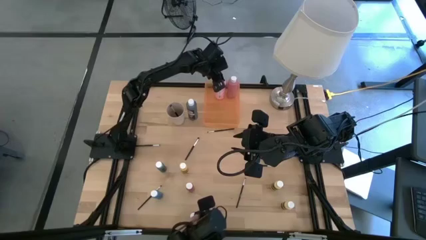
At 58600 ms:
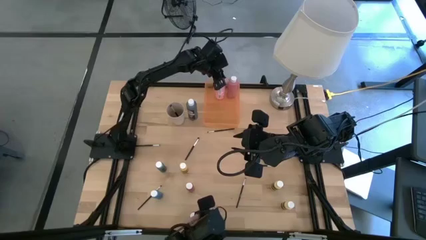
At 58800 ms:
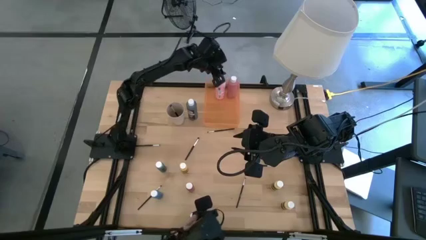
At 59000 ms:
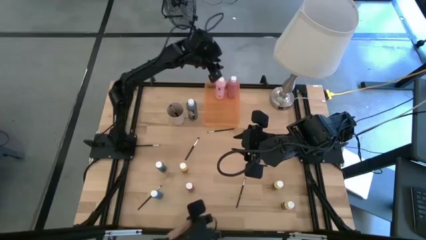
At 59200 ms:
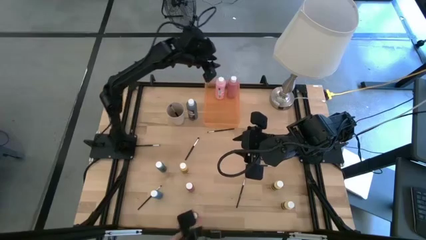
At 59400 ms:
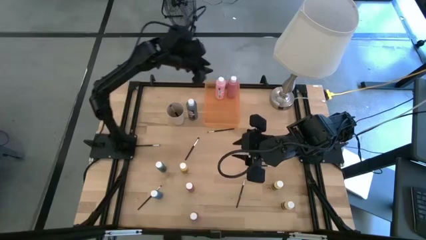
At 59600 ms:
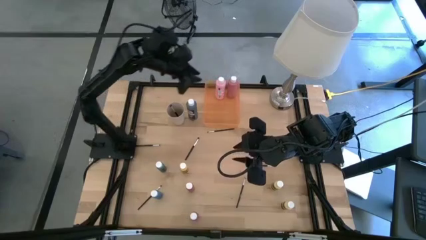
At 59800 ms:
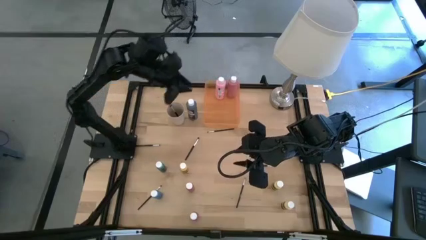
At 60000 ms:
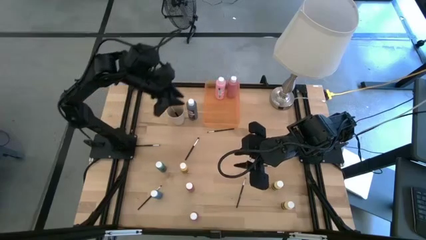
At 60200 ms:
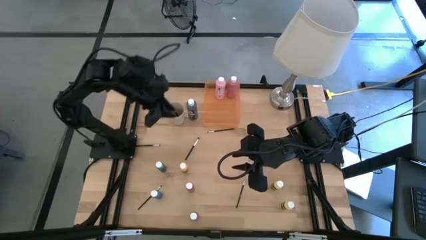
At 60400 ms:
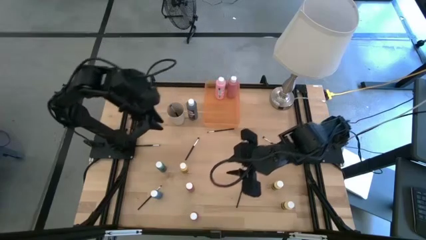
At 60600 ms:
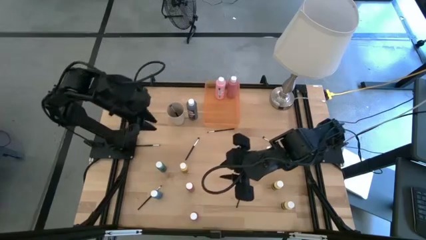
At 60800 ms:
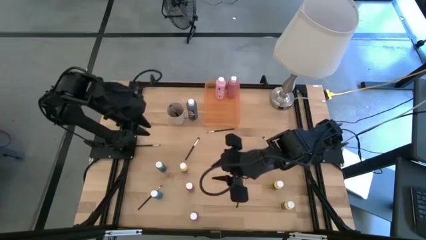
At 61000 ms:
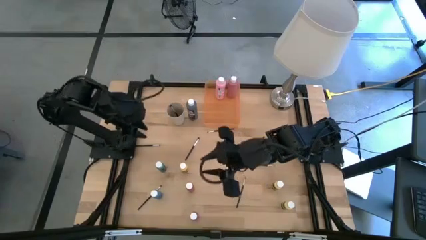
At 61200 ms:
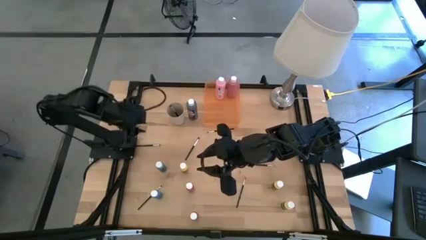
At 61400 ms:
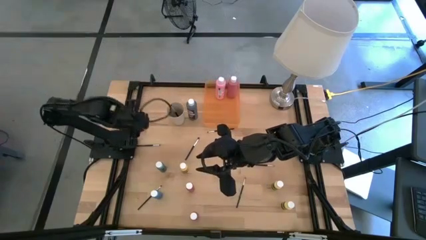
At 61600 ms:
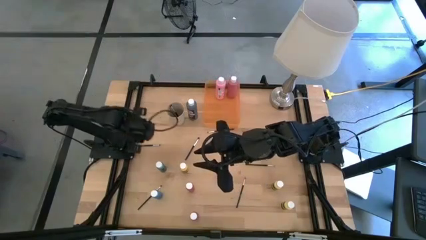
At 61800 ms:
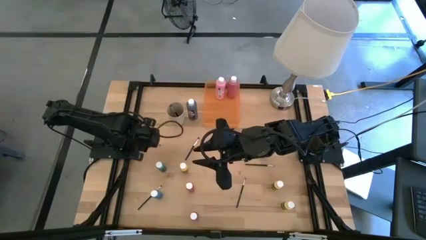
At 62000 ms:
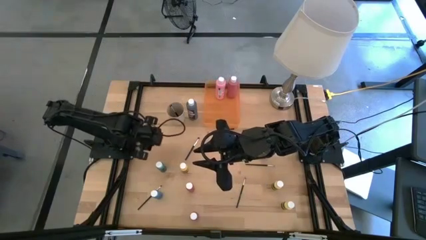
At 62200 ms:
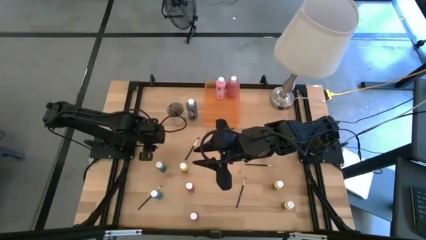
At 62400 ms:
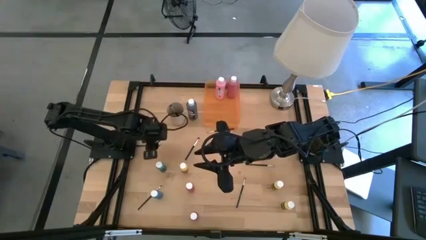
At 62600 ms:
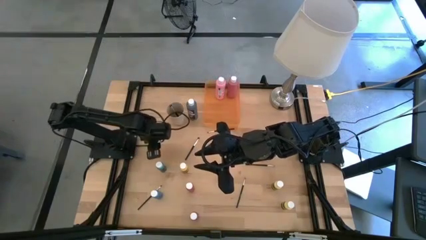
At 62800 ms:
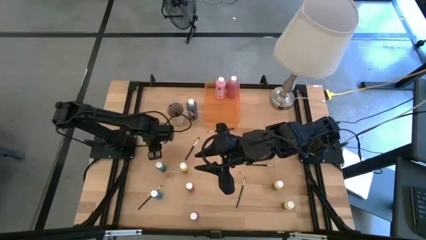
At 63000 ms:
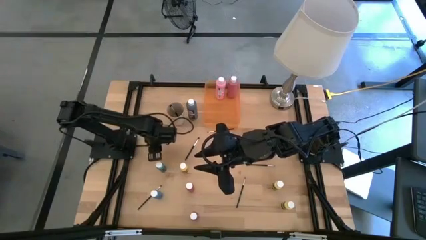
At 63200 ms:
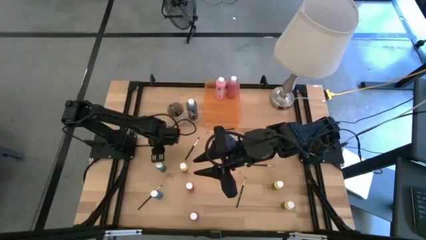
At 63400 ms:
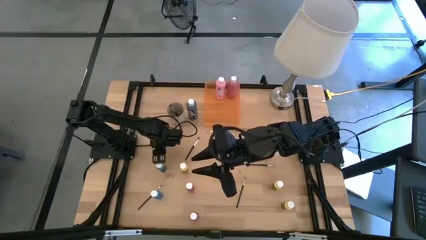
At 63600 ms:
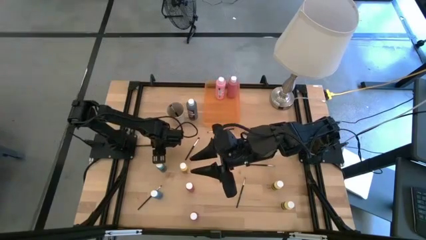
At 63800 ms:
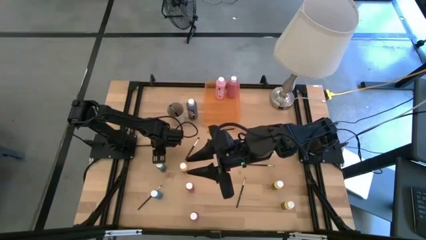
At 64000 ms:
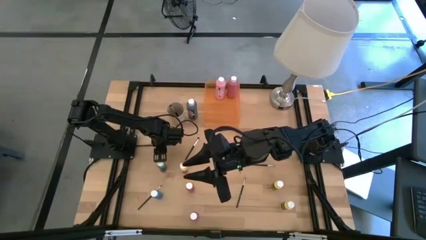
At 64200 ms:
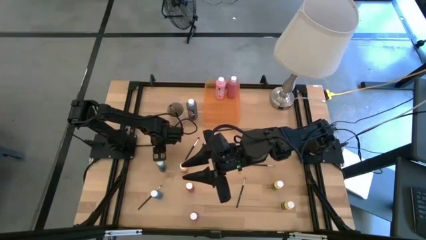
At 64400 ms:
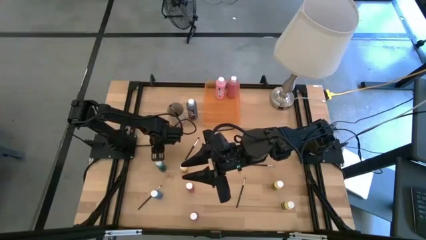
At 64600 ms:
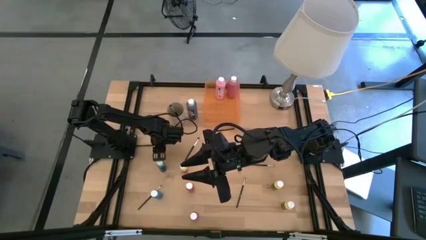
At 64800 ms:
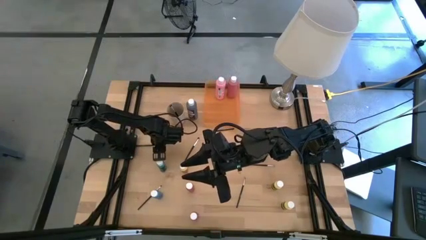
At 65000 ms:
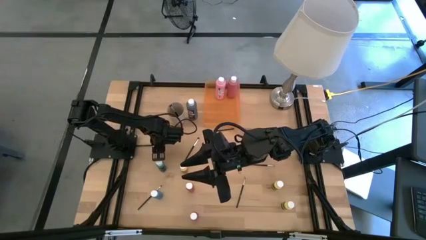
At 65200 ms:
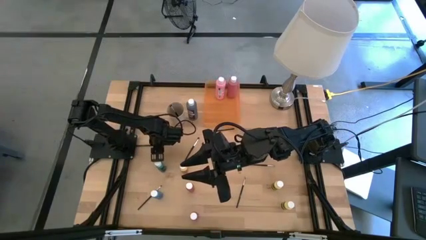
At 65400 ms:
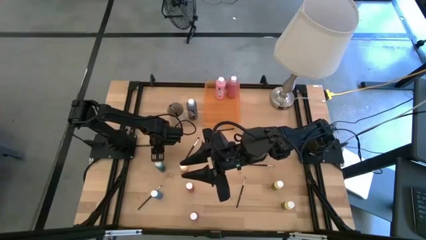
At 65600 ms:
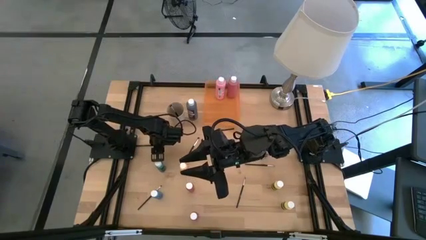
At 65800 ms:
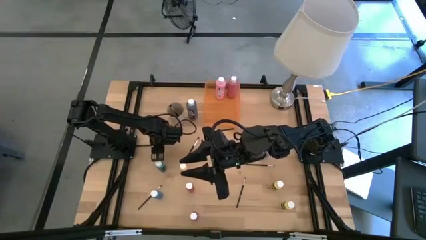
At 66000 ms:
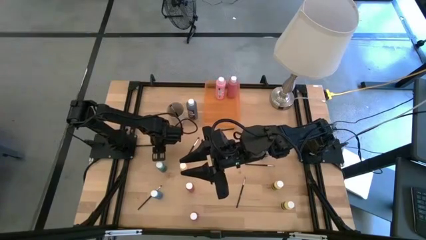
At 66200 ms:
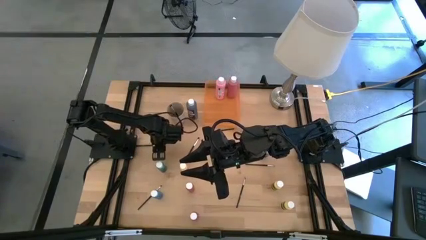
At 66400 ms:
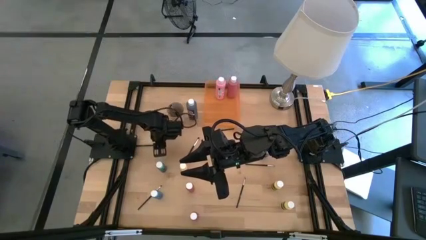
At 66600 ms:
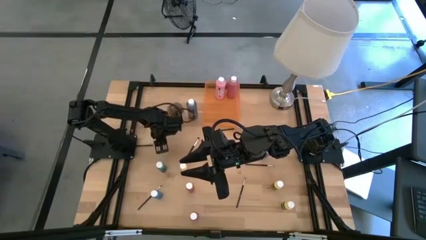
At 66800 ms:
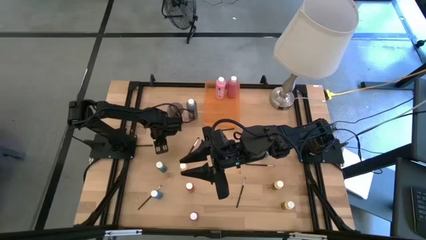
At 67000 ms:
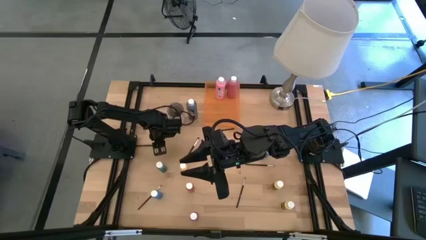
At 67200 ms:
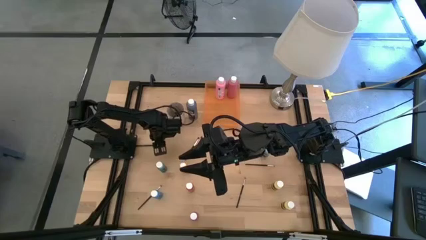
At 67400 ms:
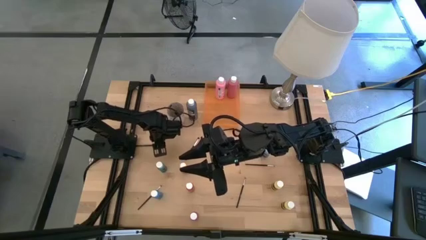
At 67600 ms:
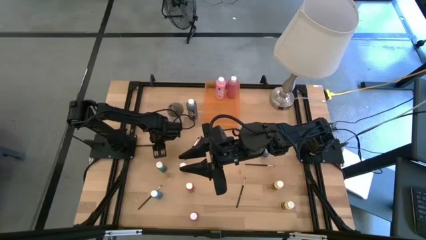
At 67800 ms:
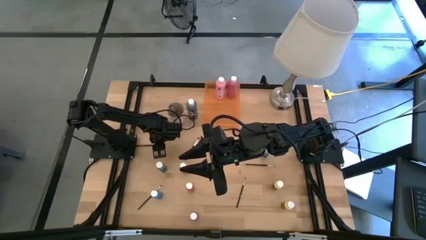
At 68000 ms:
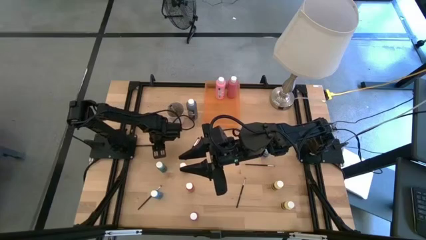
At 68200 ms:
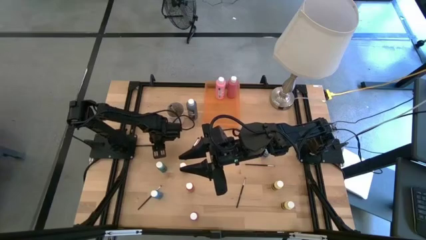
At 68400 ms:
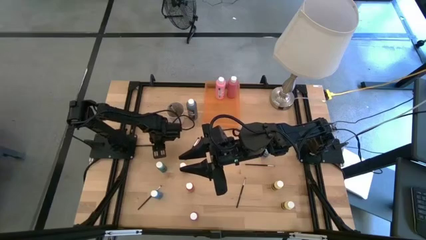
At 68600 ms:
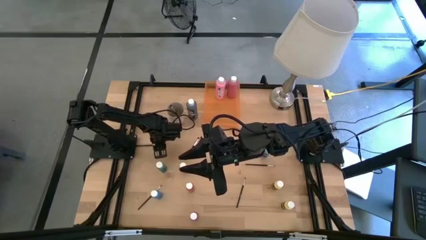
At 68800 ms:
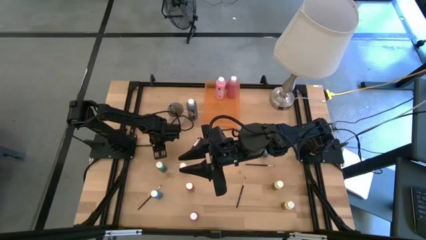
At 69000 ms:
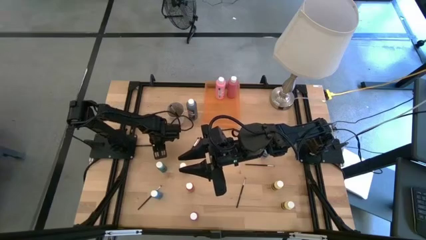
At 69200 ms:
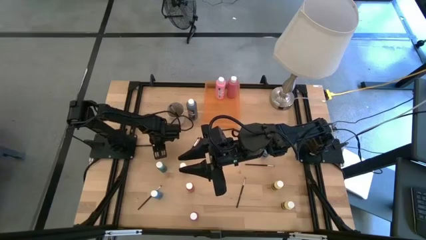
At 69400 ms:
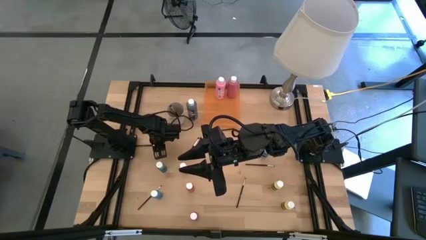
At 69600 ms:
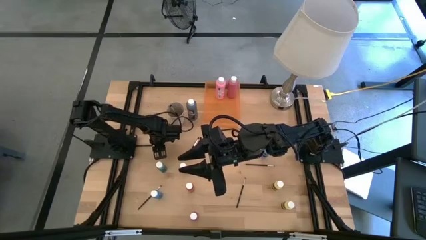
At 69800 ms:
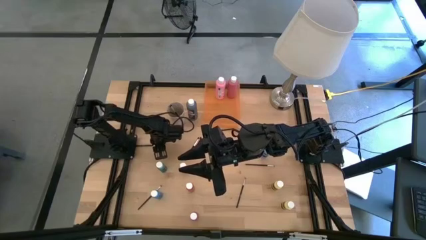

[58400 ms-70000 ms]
Task: Pick & Place Paint Supplies
Put the black paint brush into the white cup

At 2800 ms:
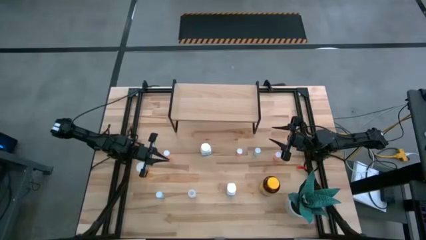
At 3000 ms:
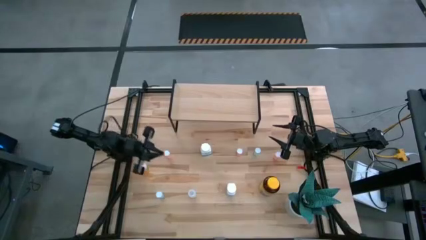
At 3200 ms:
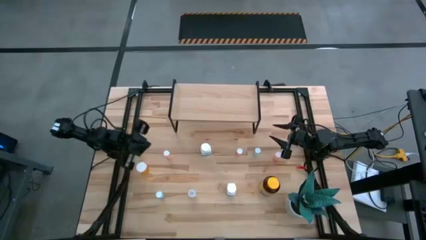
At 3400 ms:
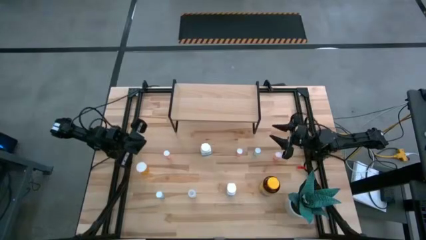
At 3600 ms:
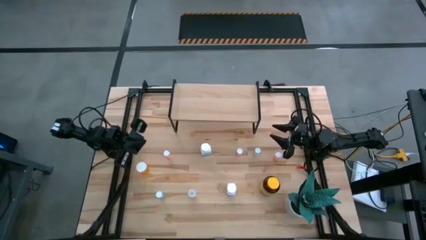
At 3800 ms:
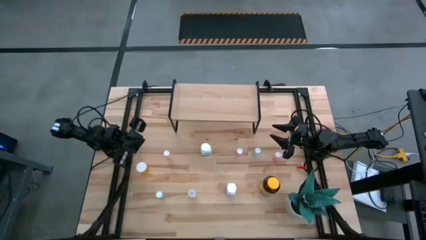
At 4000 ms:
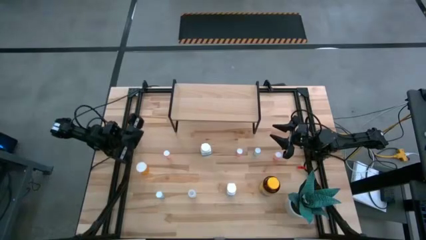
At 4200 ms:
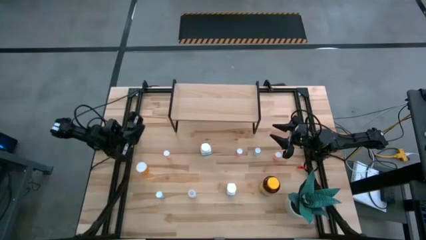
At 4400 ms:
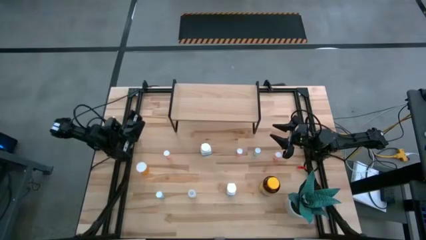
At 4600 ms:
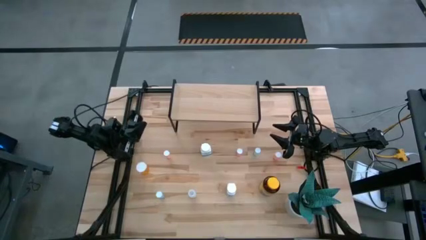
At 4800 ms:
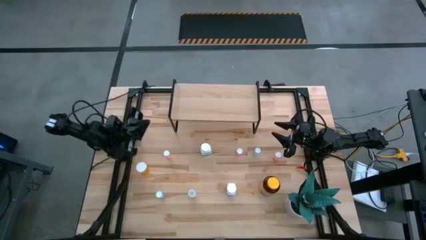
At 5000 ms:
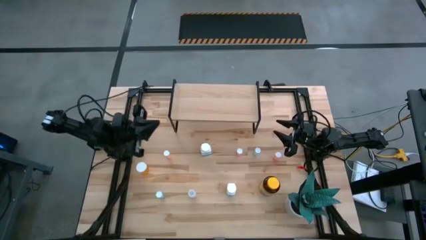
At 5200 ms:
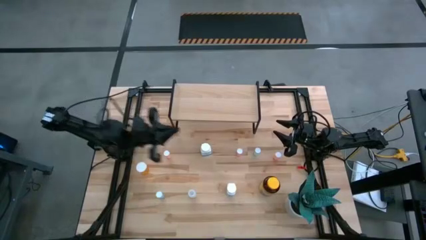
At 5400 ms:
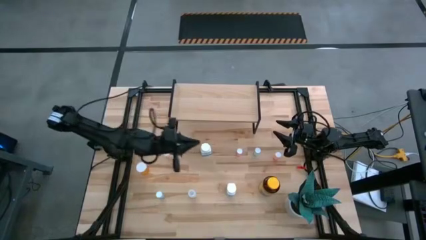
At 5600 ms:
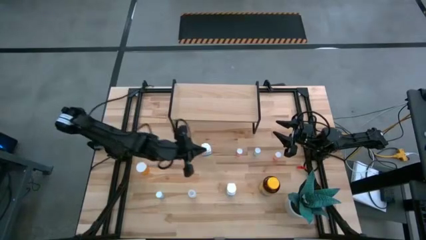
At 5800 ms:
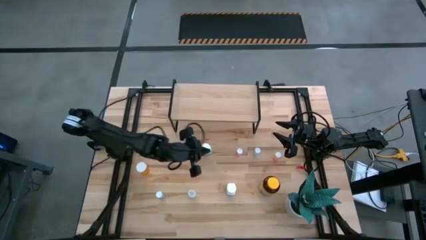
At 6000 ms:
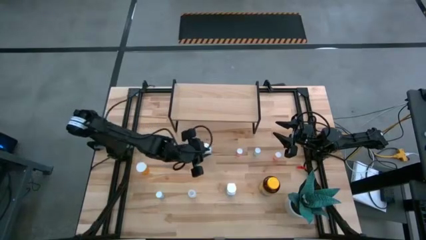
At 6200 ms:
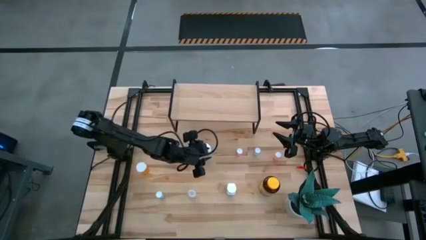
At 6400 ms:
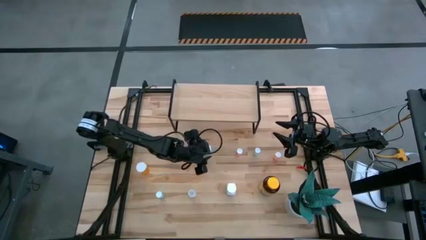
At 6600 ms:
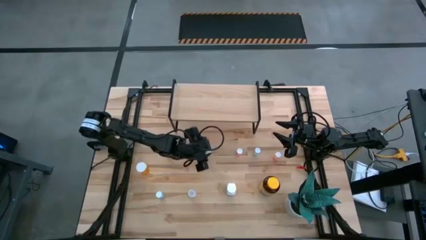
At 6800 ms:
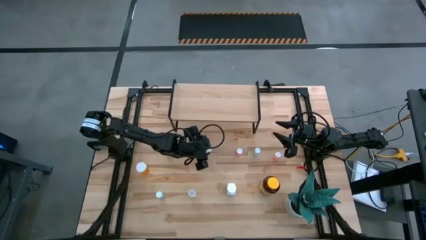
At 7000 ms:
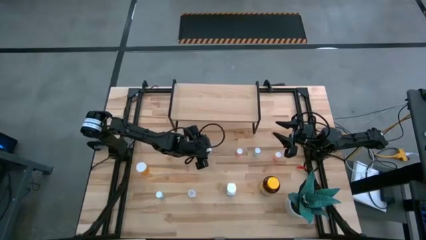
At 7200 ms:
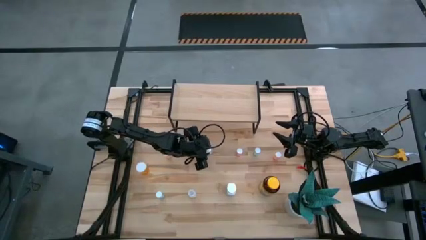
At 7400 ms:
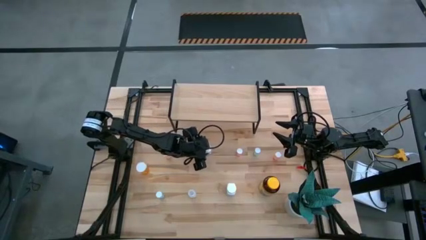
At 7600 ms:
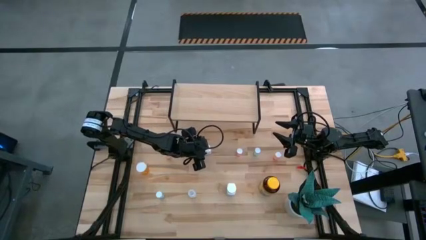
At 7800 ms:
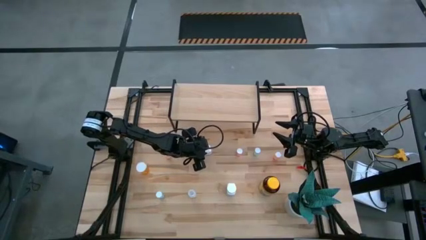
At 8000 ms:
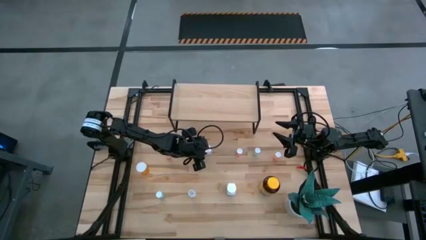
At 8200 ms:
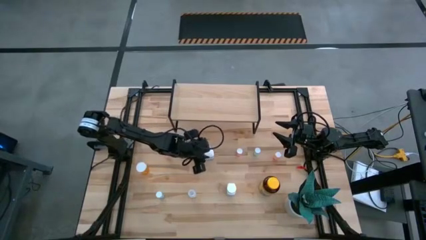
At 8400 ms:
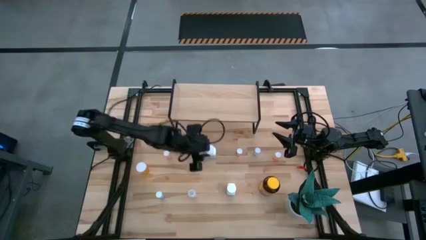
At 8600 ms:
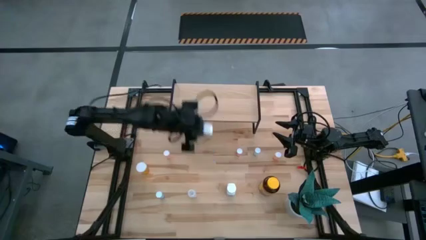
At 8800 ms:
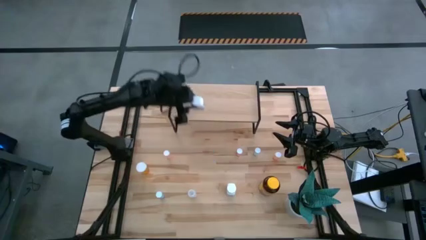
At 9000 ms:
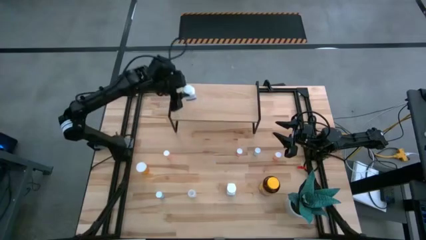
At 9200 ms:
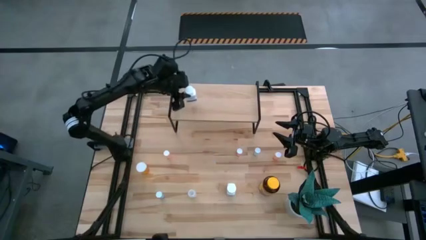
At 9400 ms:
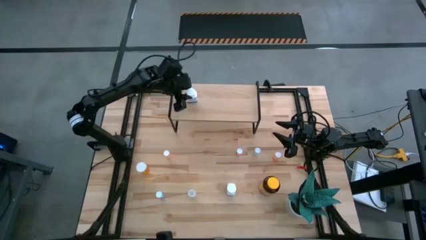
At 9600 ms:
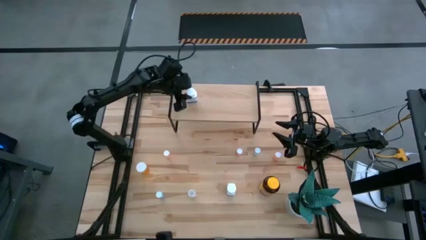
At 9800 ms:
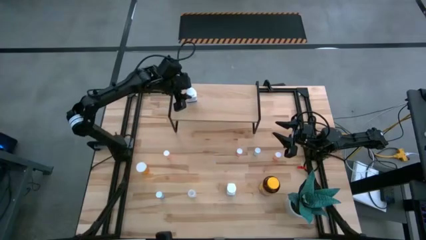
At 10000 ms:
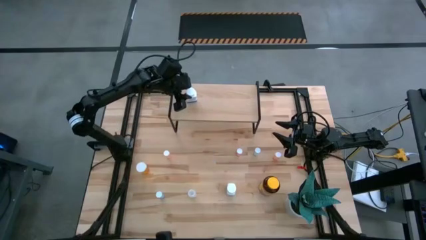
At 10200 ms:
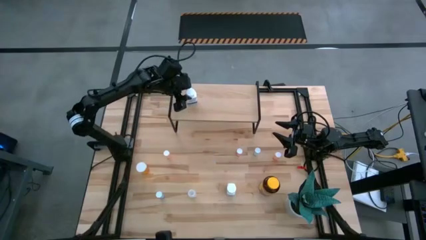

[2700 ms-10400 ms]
Task: Pick and place medicine bottles onto shelf by color
Put the top white and blue pill bottle on the shelf
